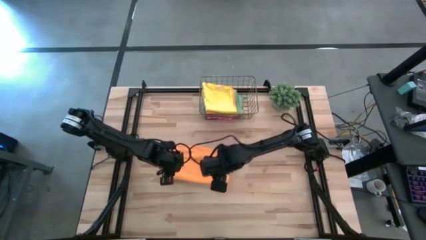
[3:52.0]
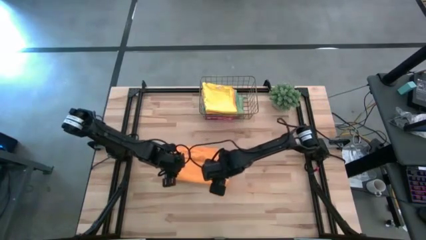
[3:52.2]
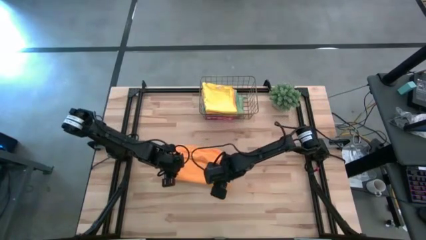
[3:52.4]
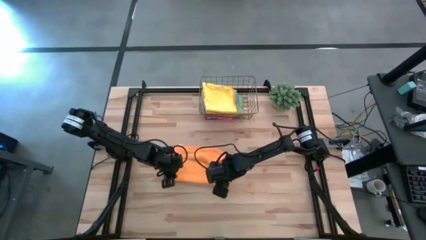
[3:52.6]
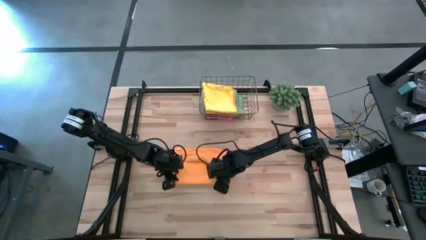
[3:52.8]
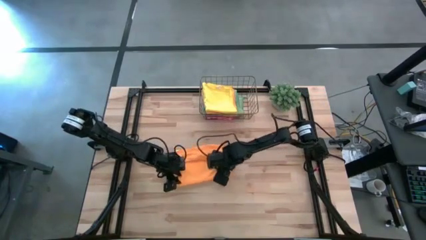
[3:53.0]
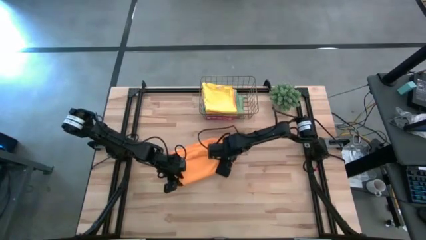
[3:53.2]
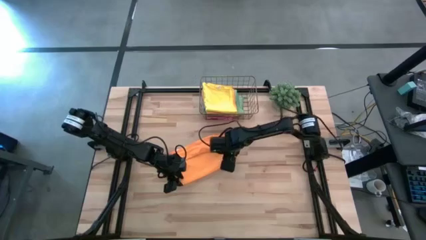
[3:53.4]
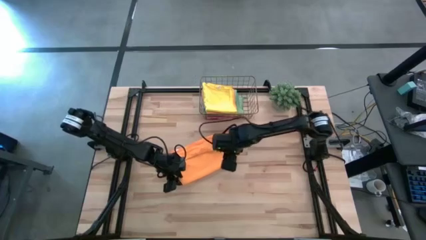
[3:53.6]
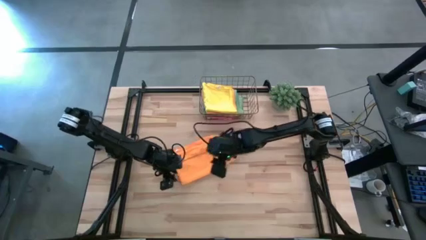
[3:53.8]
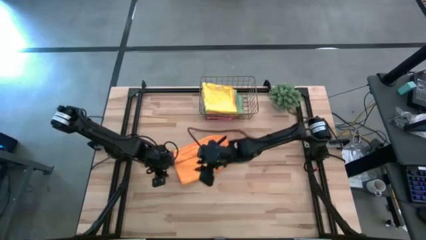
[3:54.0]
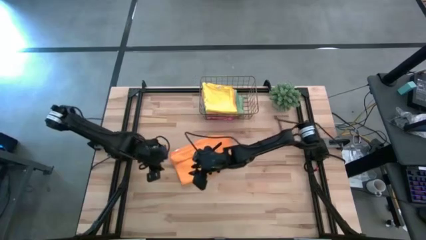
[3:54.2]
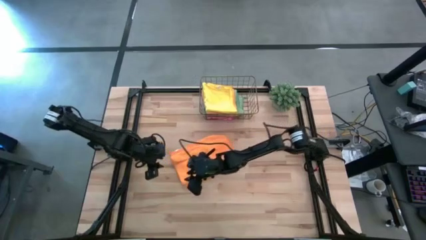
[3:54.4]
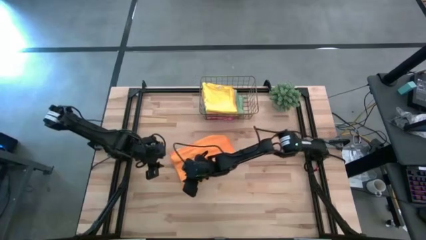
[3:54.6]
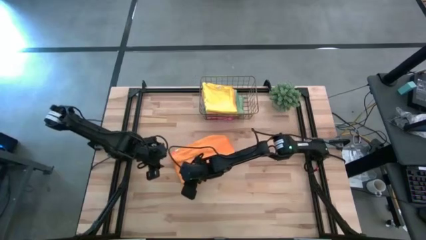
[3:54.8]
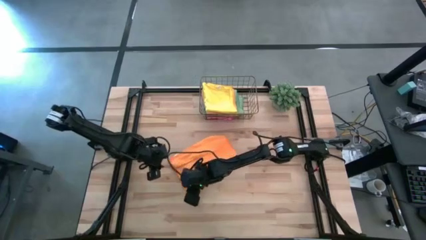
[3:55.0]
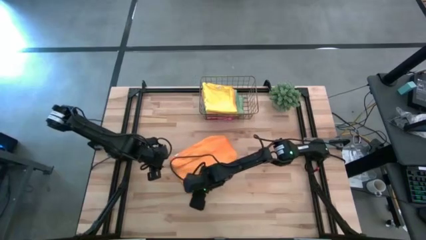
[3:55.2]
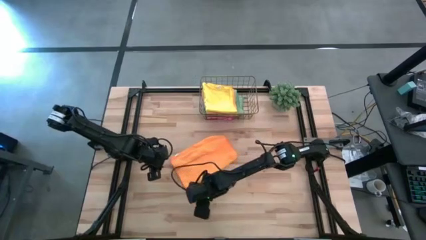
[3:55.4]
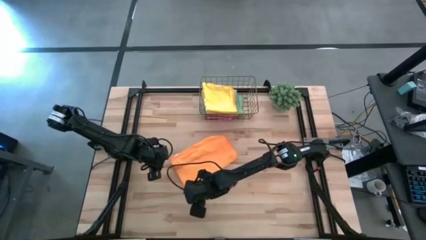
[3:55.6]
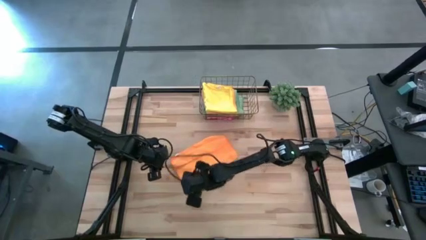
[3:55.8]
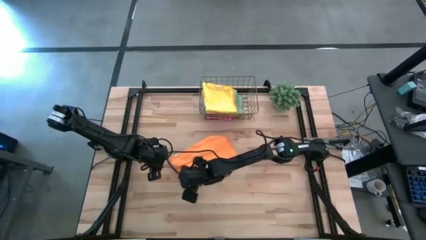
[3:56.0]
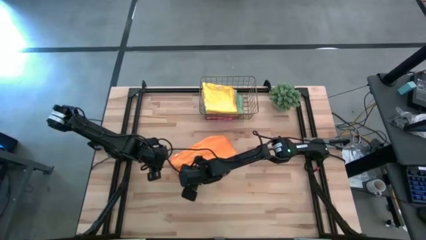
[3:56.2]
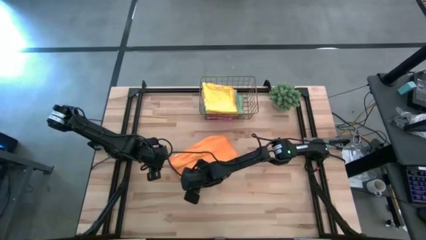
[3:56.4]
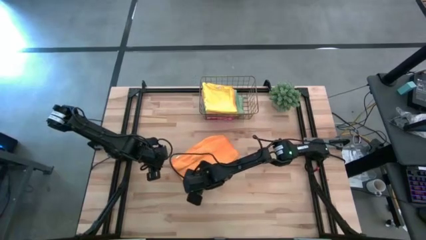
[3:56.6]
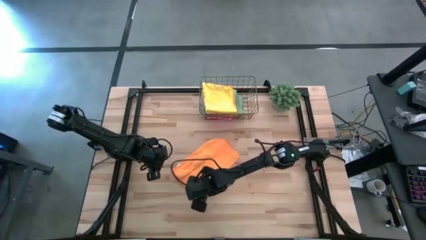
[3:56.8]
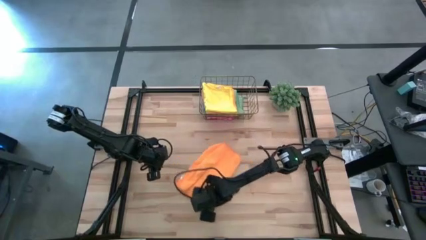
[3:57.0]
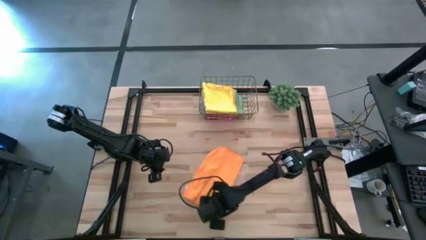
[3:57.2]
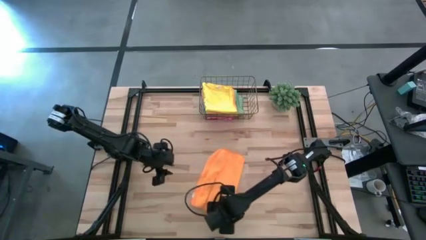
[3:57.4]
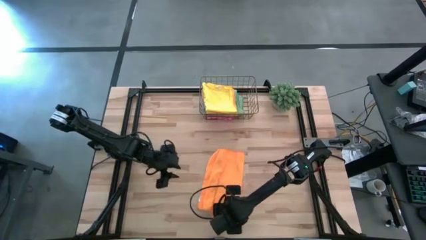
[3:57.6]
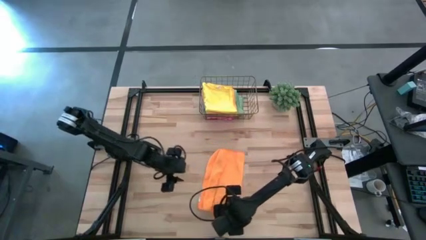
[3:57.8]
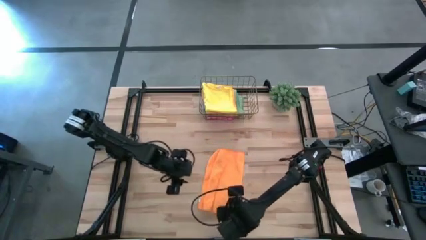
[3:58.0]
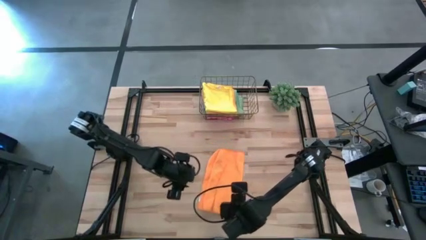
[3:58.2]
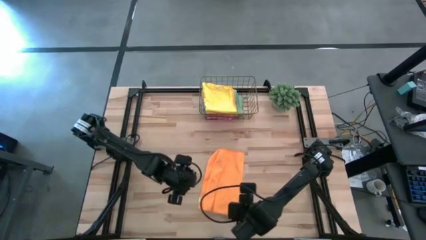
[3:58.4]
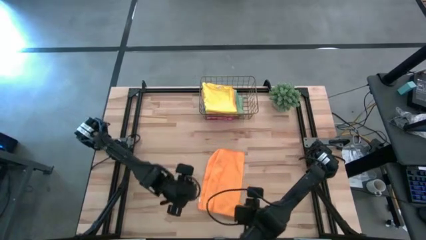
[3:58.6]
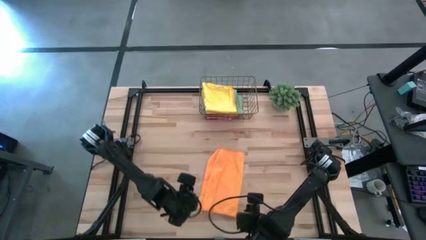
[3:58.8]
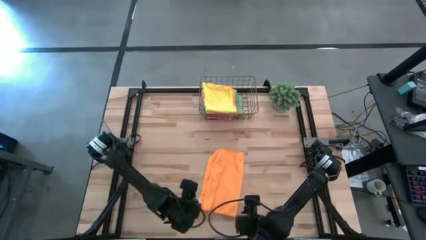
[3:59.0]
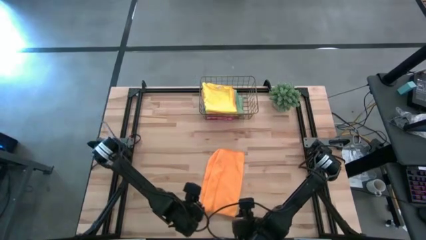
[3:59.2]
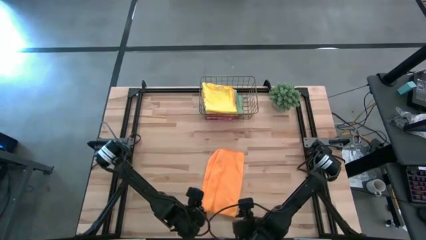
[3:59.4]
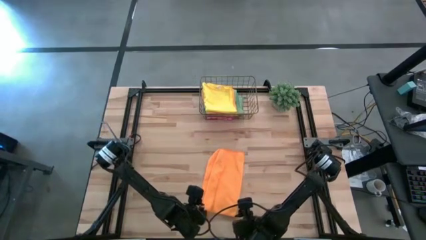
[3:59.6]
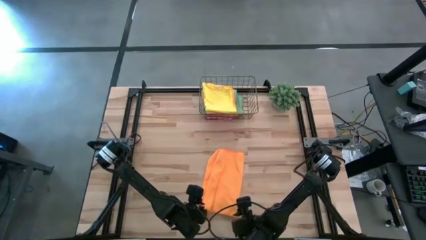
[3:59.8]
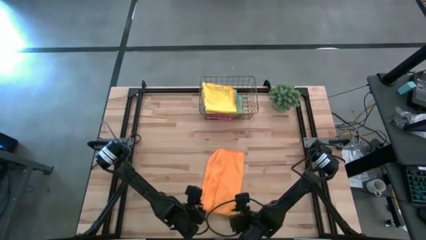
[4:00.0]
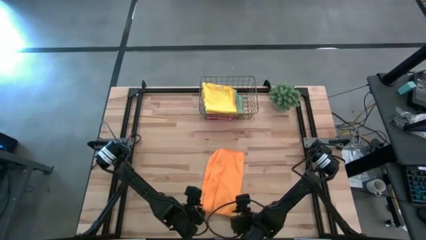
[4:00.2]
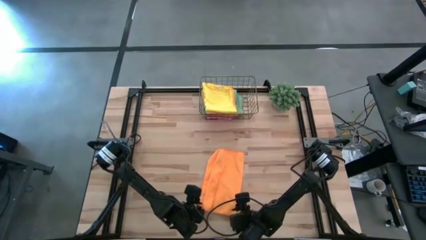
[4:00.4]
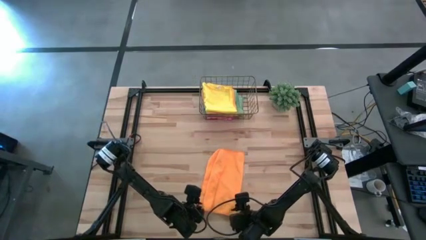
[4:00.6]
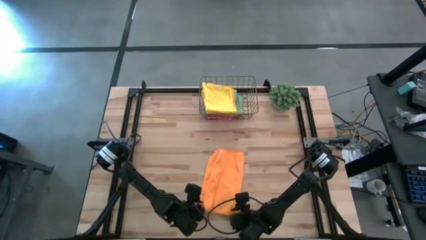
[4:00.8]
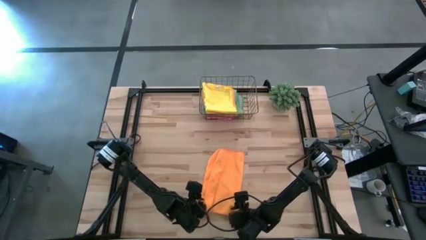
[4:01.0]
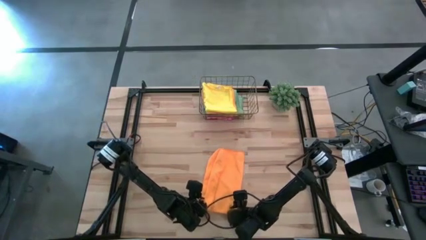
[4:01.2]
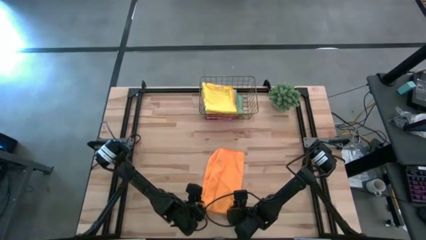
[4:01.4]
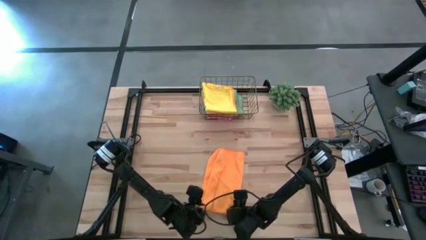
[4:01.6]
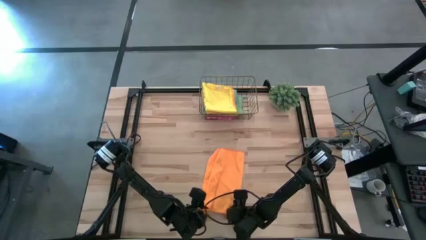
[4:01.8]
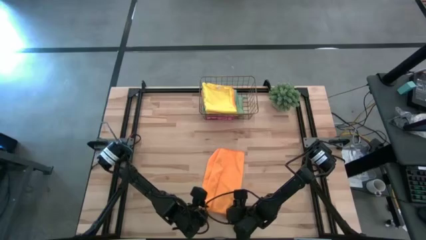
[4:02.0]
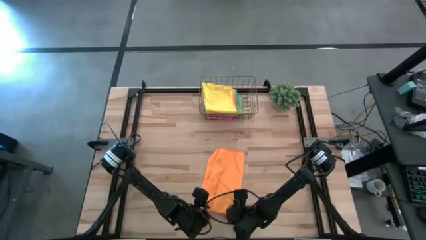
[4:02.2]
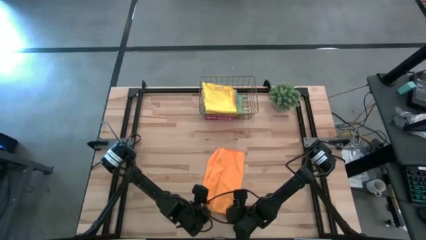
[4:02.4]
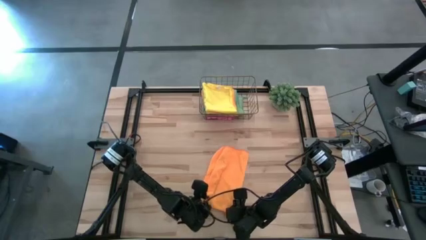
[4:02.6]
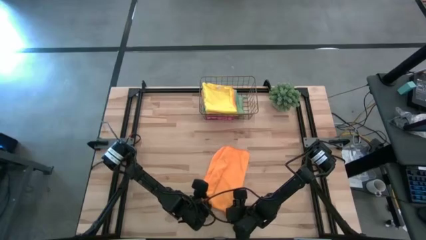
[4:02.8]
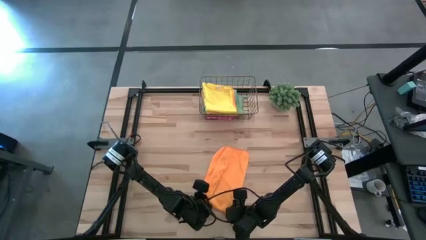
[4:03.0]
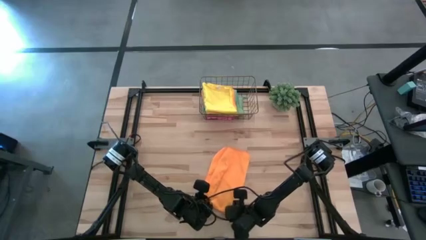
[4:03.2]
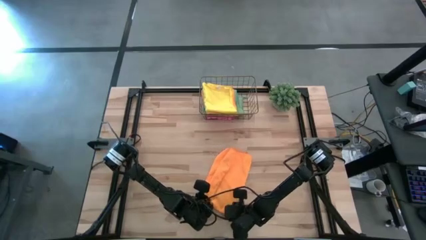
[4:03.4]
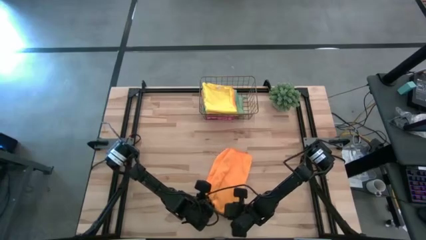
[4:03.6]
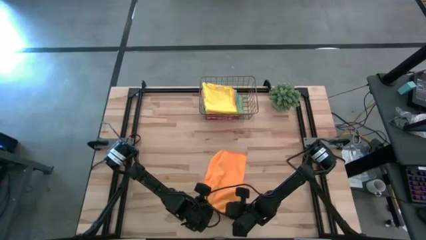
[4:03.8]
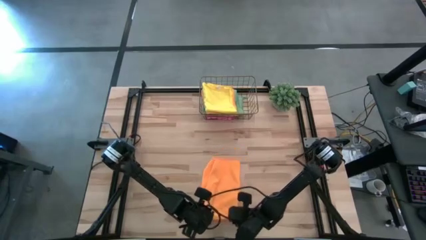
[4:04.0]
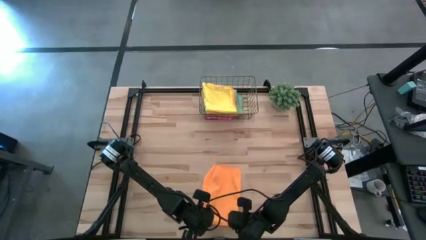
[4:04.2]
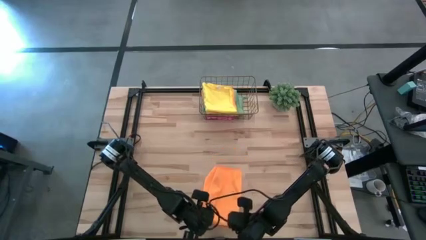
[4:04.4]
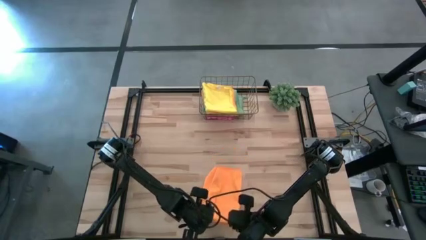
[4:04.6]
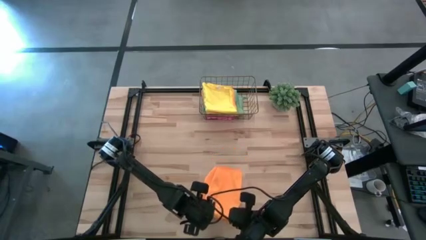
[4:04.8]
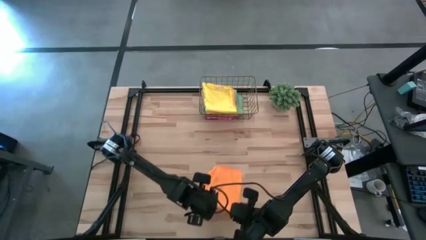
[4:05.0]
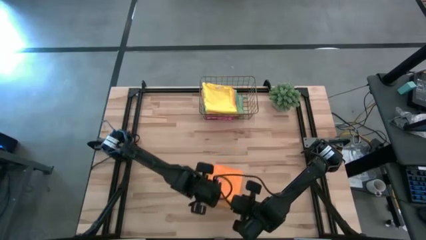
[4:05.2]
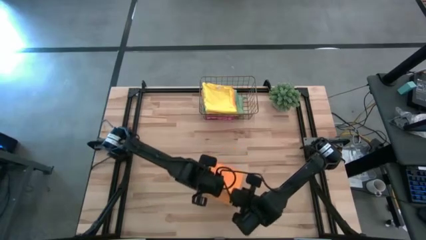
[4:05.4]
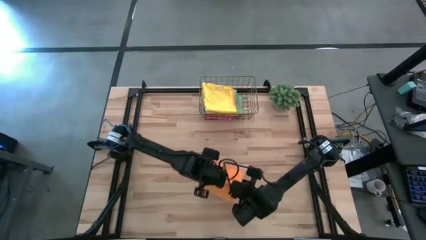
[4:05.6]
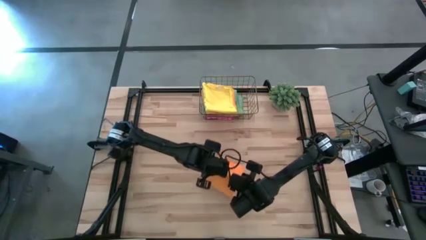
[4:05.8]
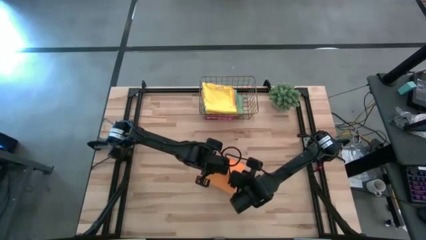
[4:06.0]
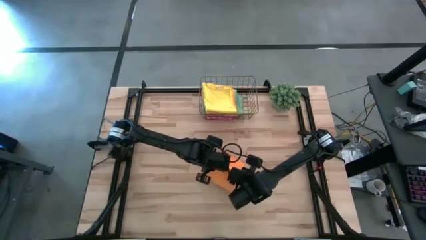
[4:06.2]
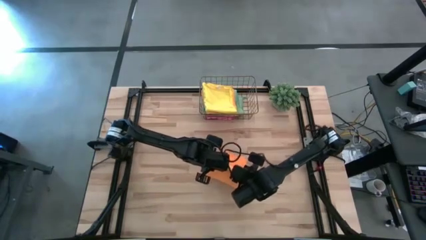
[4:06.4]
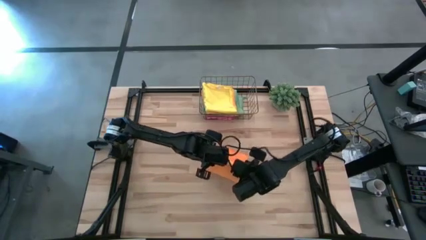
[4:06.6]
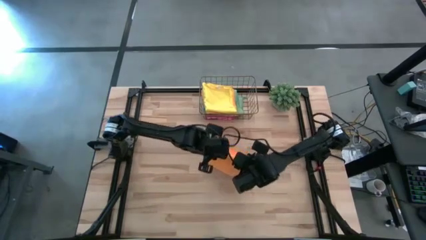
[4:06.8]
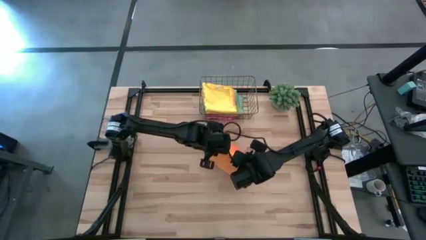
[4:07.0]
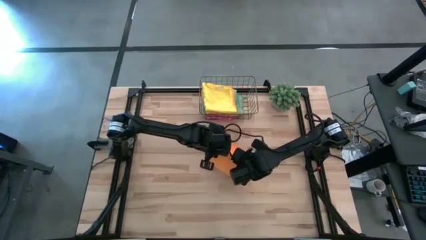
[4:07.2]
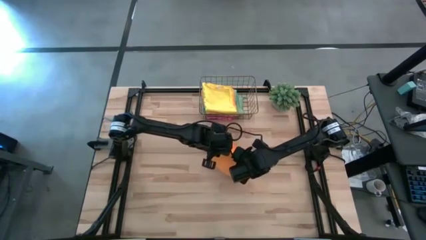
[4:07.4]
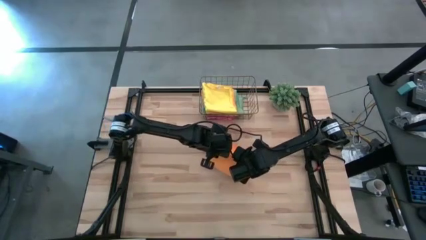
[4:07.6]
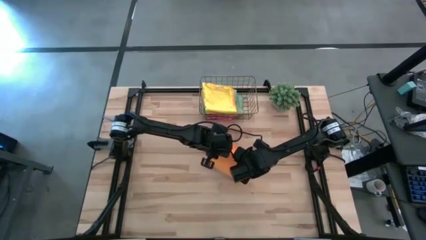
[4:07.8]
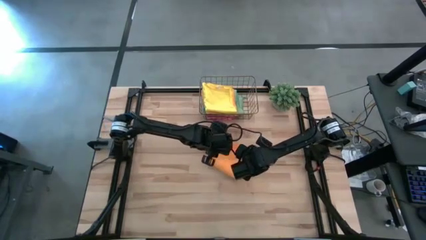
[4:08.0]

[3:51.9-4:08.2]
Task: Fold microfiber towels
Fold the orange microfiber cloth

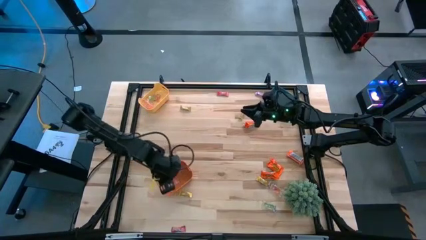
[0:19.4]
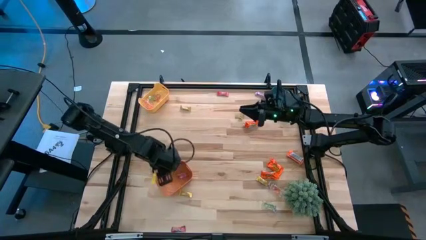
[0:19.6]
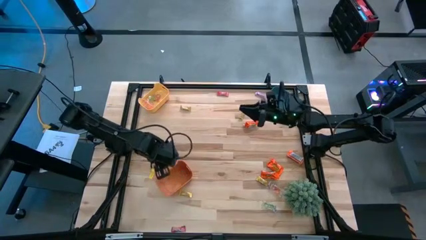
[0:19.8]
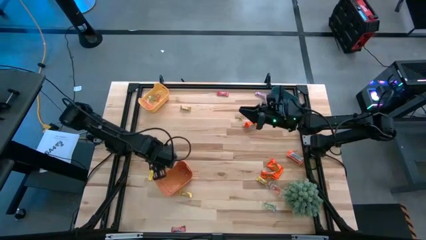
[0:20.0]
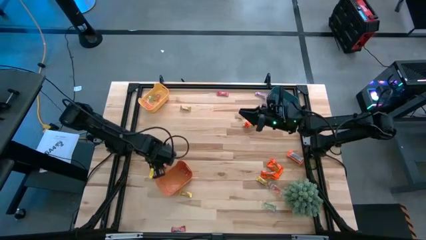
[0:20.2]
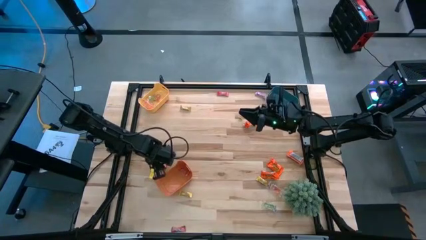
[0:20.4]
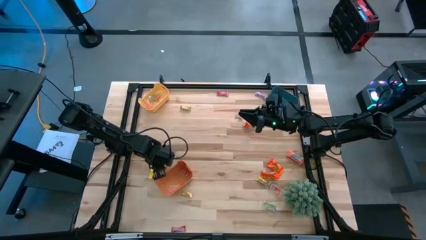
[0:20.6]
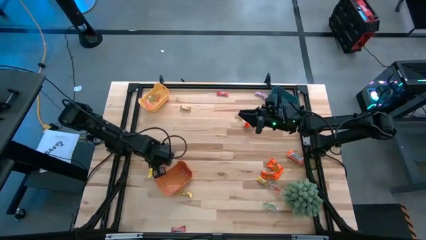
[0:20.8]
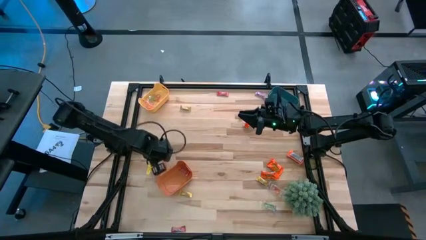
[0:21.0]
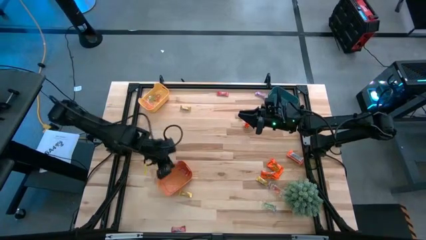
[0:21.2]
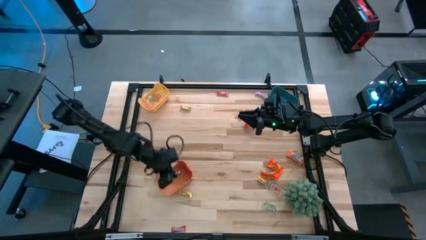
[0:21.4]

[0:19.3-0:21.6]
Task: Sort candy
Put the center red candy into the orange bin
